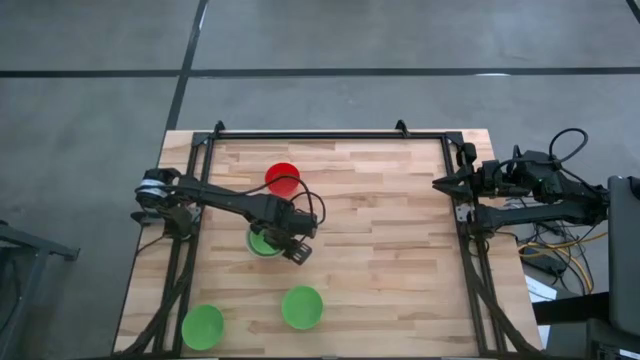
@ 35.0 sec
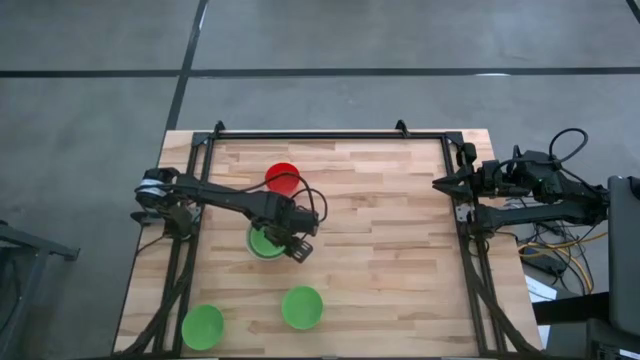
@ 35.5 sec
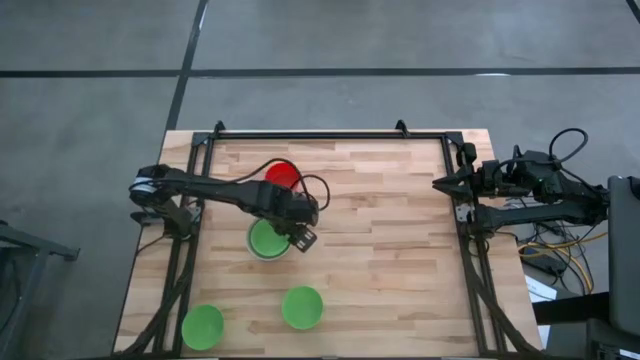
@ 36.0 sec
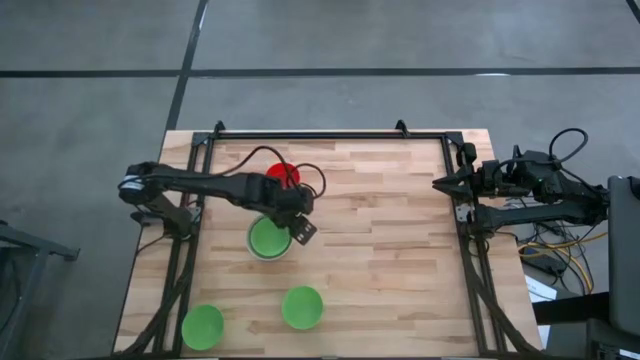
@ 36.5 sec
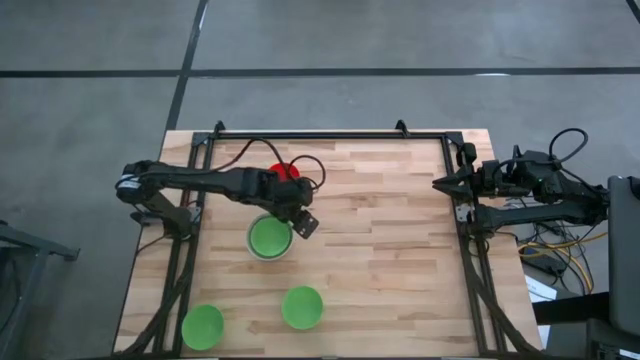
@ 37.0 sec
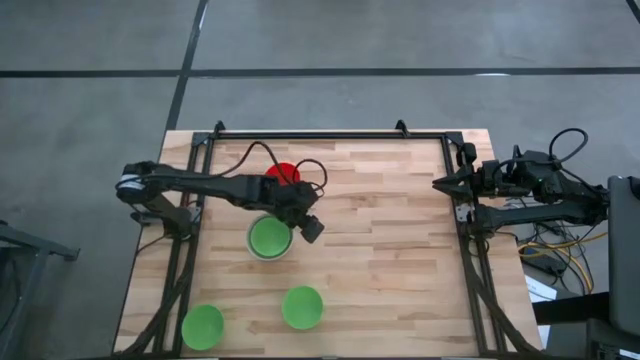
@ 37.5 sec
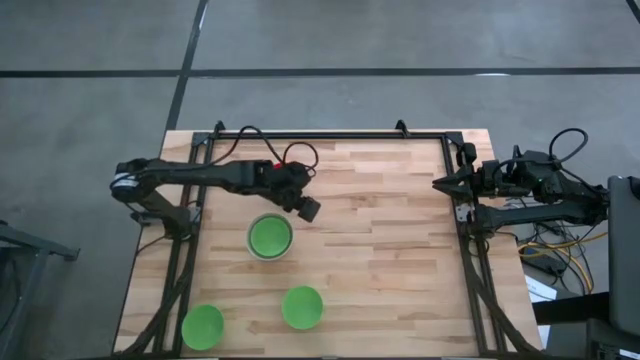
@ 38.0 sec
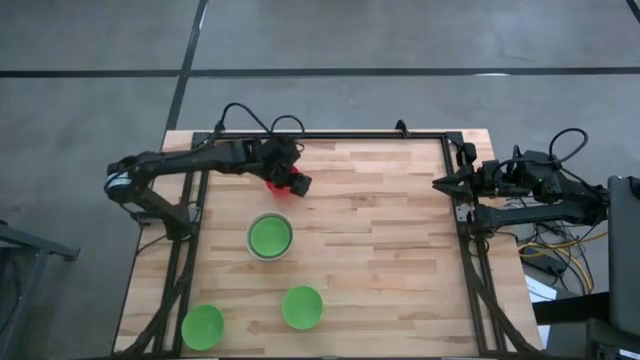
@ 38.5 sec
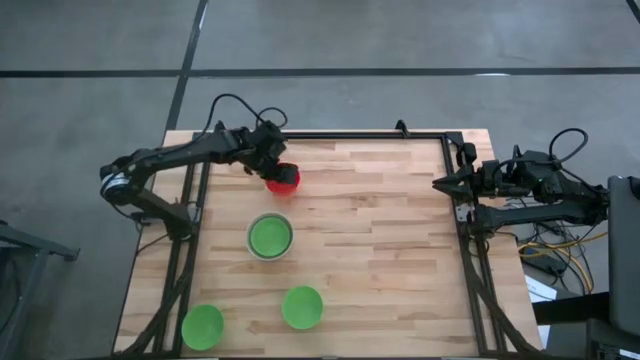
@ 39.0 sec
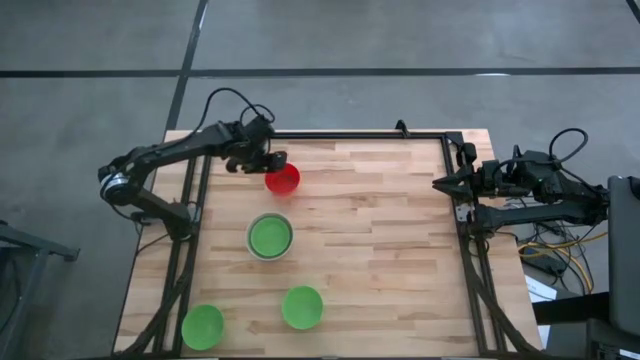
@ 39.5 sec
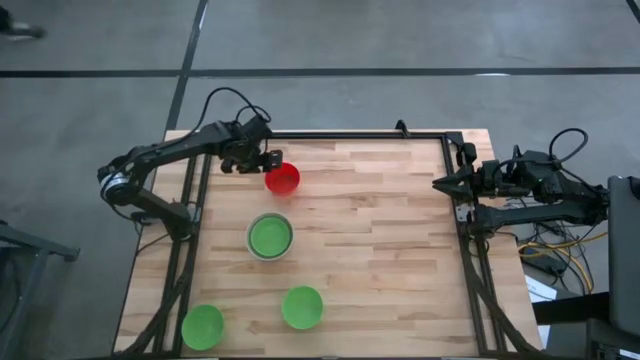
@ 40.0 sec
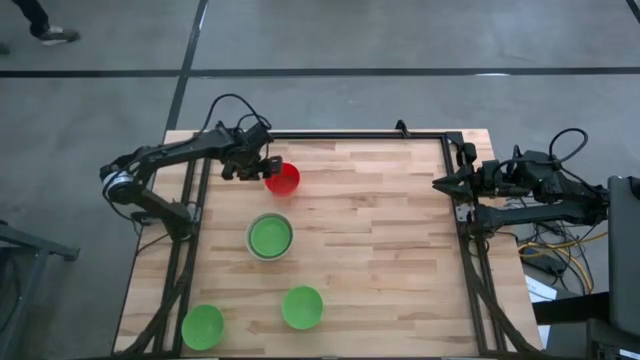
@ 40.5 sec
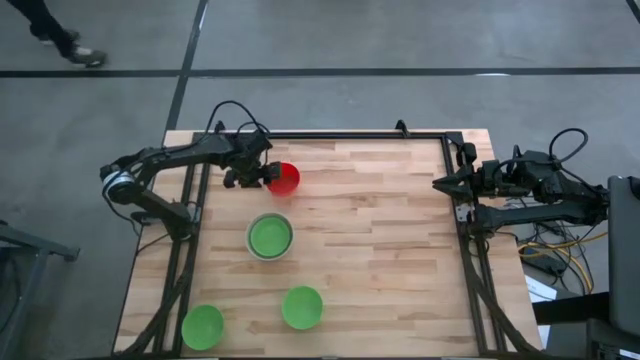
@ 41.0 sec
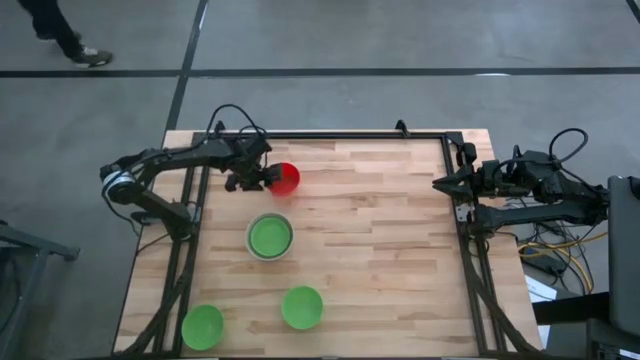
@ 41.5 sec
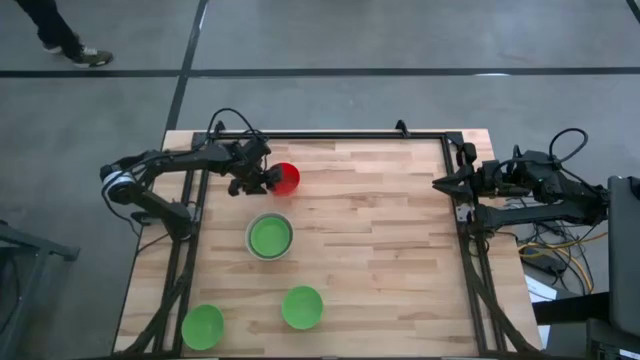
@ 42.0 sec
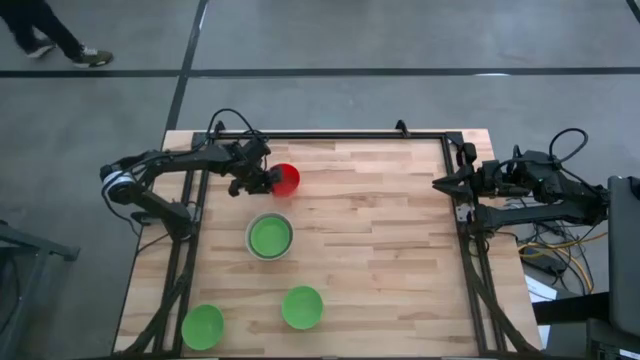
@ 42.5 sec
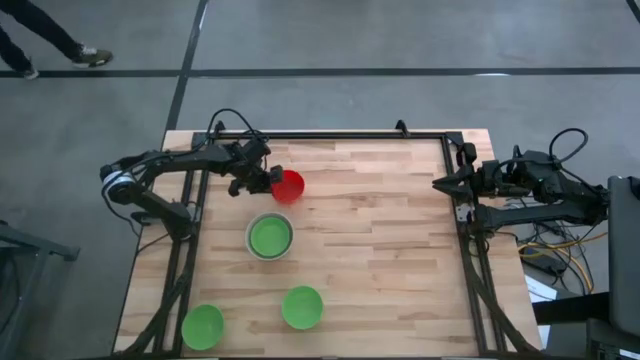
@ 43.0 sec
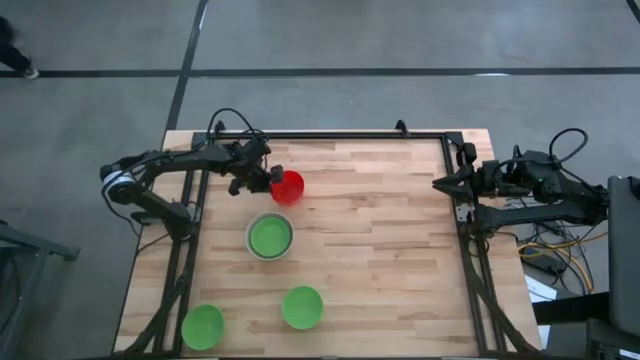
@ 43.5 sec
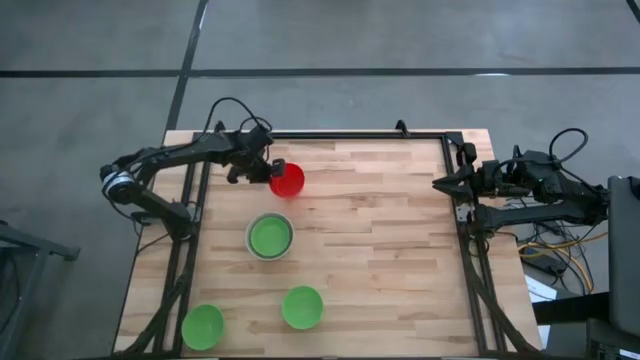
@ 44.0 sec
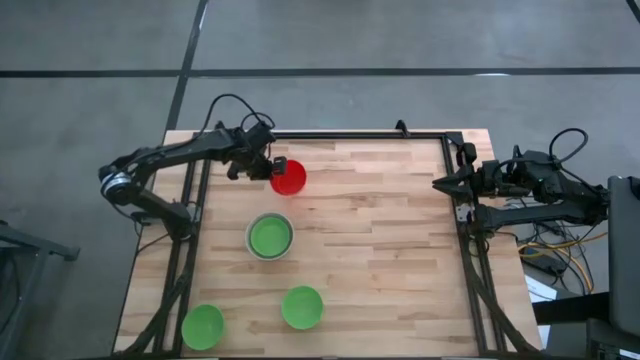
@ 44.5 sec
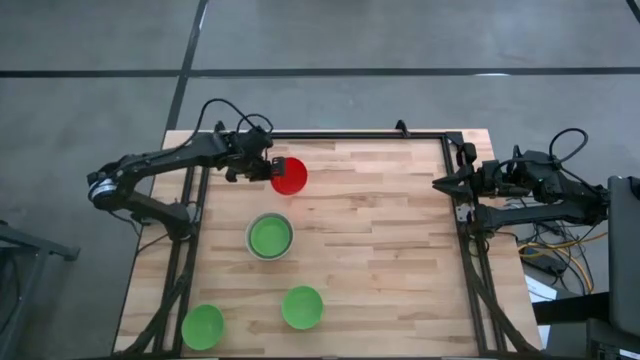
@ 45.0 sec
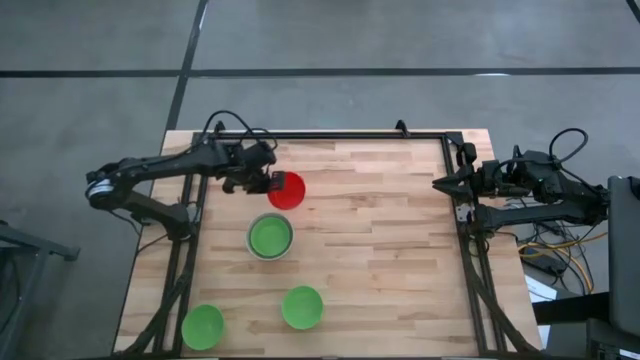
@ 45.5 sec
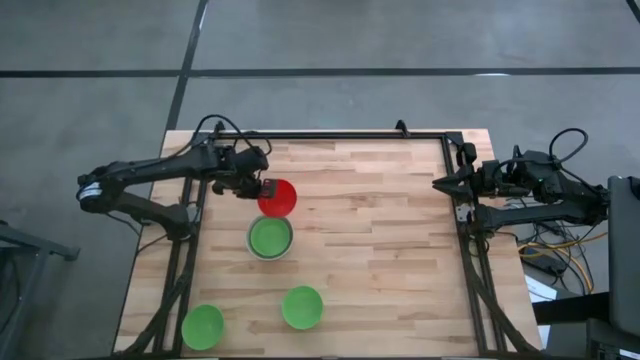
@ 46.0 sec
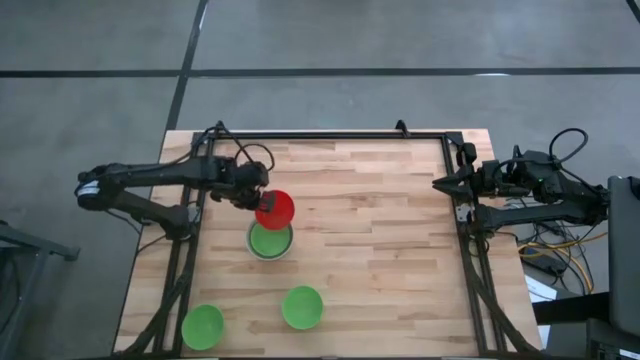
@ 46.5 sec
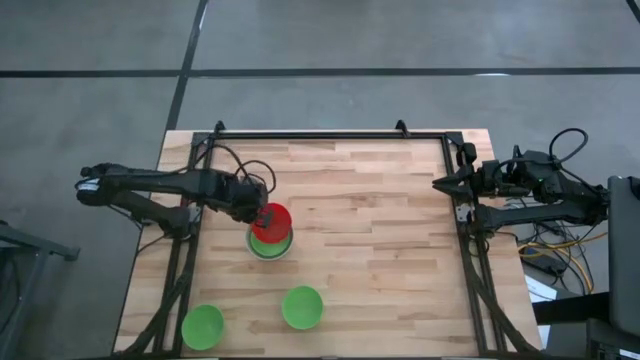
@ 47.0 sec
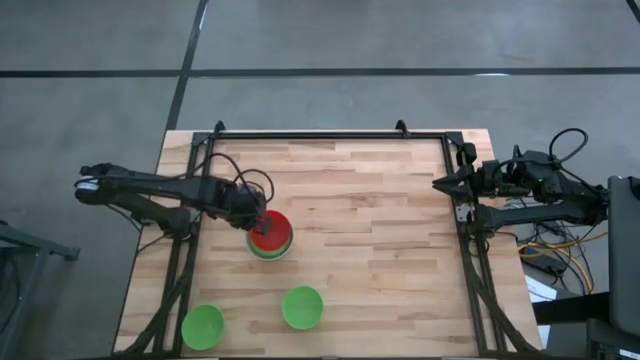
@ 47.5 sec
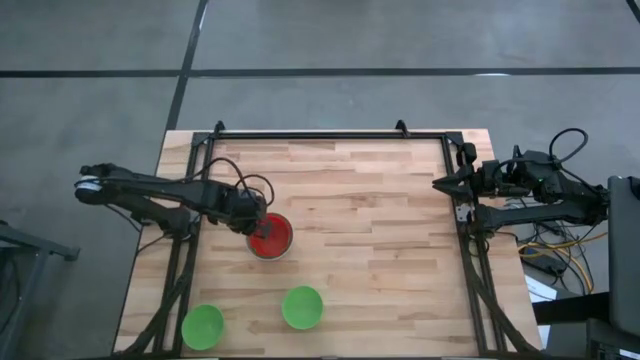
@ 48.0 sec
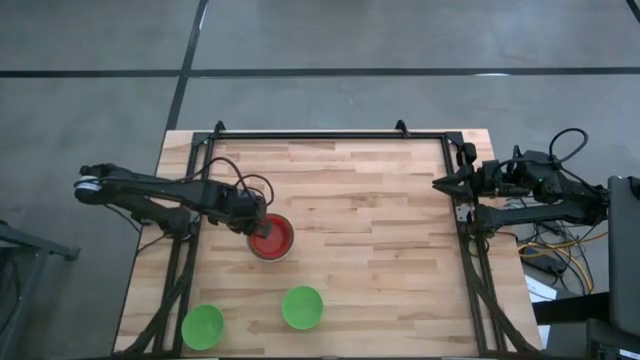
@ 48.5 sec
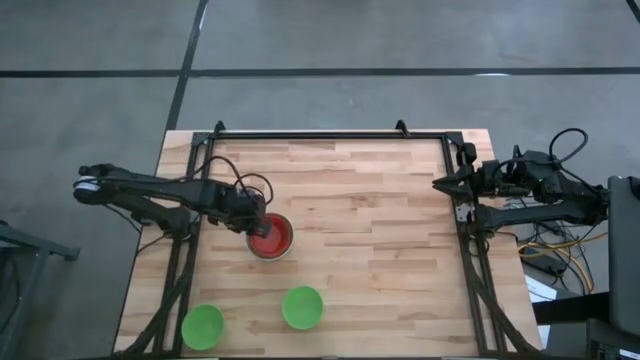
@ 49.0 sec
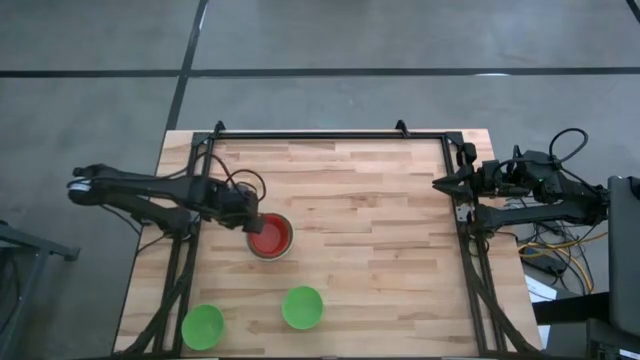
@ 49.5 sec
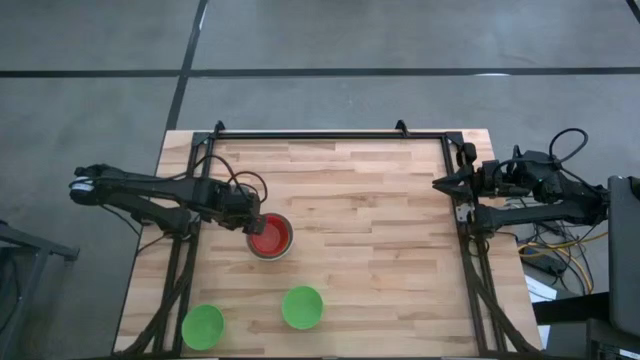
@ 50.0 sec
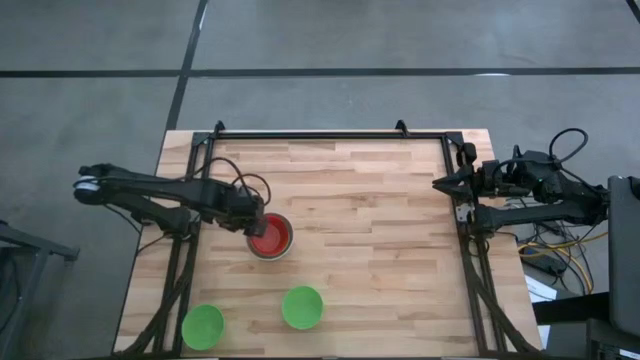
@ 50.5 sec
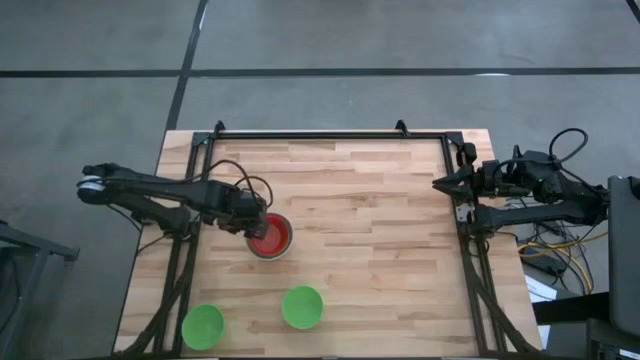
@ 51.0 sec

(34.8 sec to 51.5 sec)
Stack the red bowl on top of the green bowl
